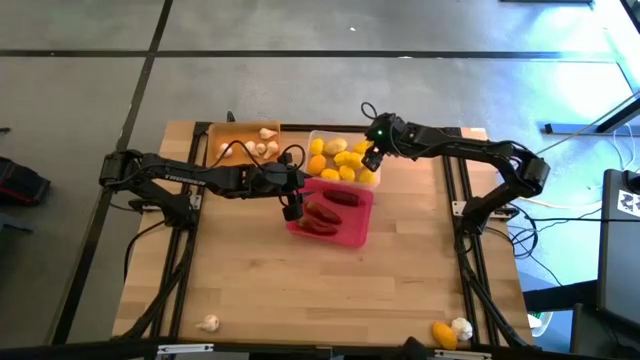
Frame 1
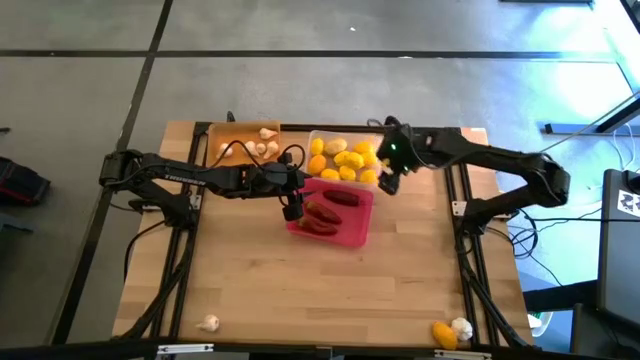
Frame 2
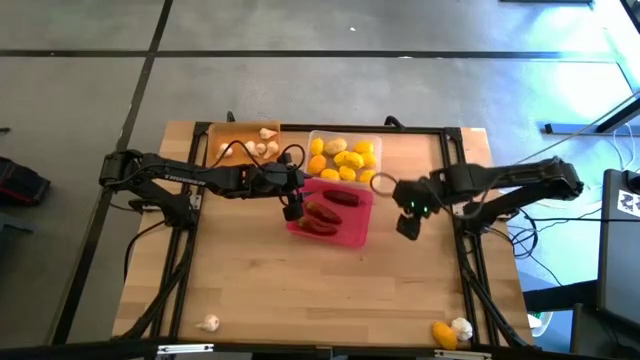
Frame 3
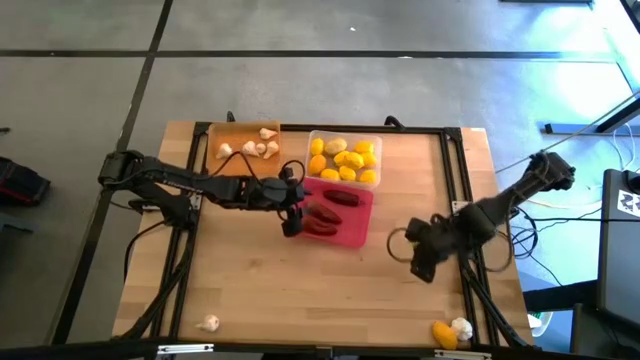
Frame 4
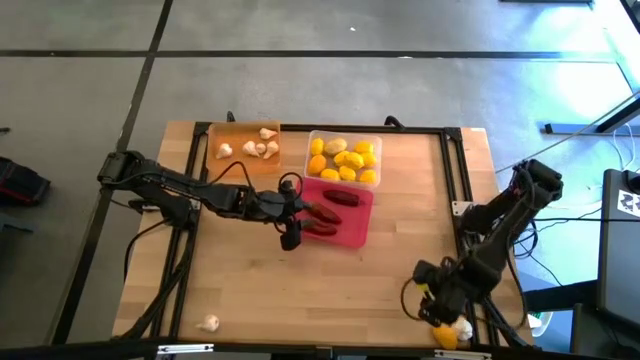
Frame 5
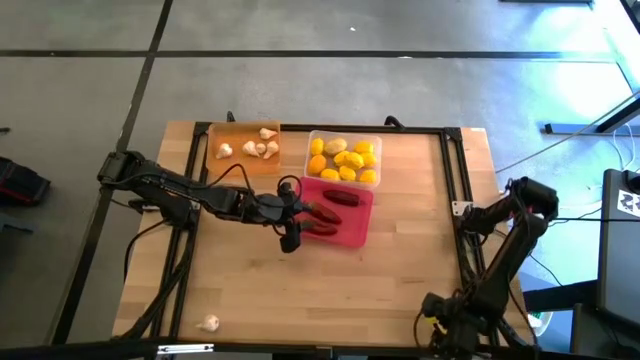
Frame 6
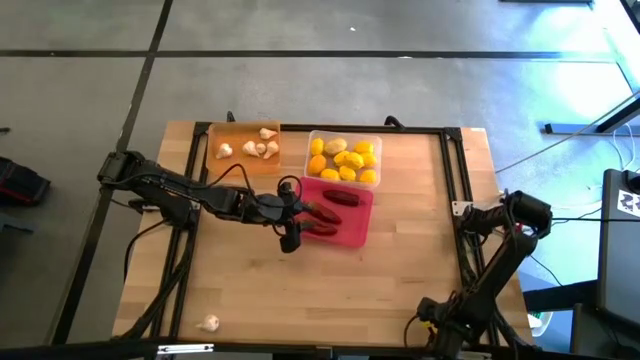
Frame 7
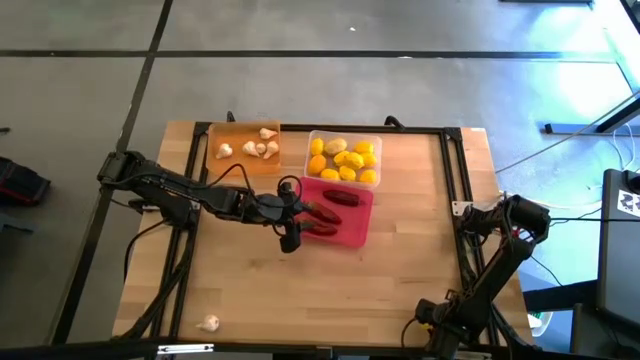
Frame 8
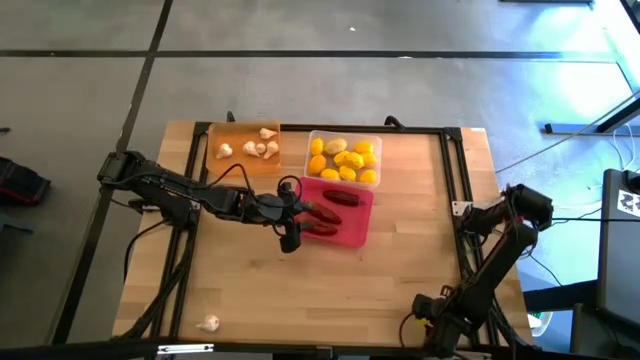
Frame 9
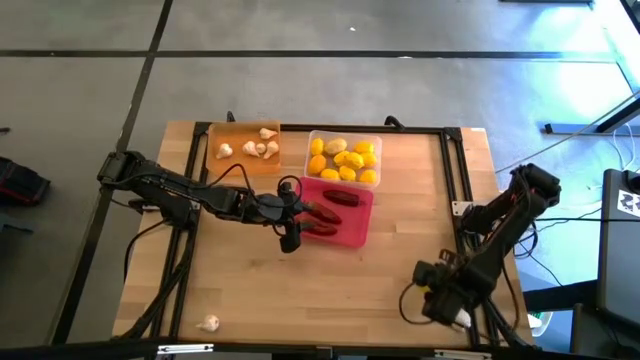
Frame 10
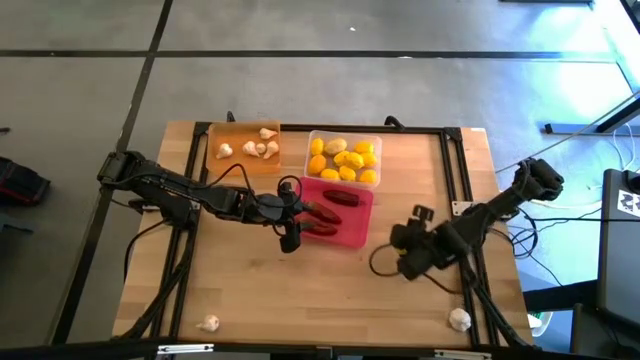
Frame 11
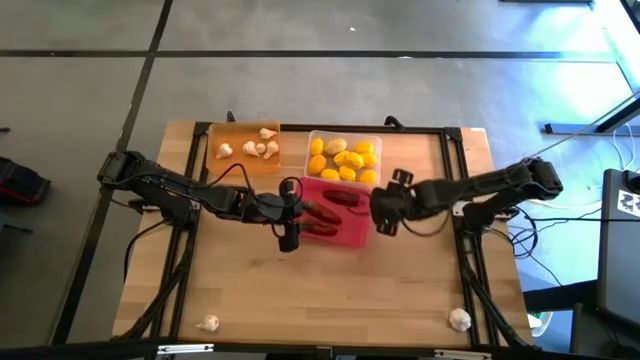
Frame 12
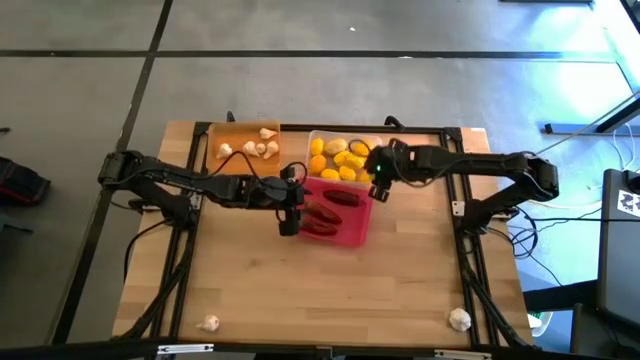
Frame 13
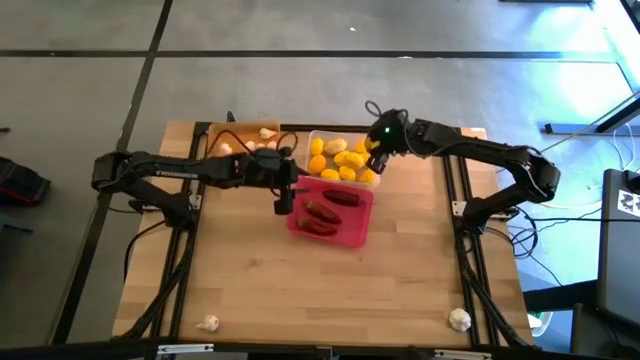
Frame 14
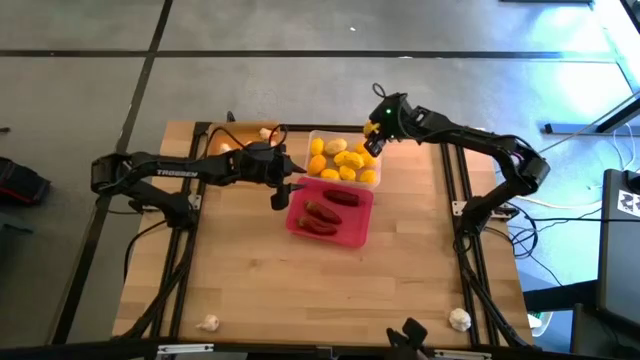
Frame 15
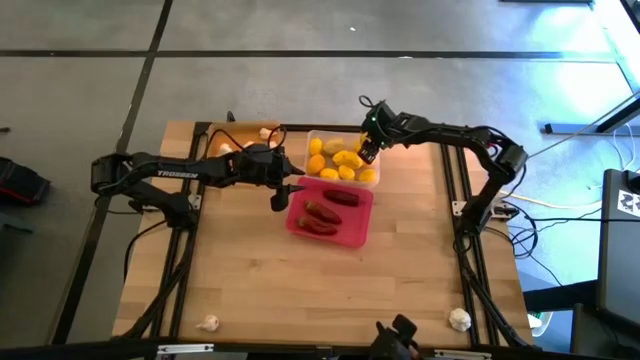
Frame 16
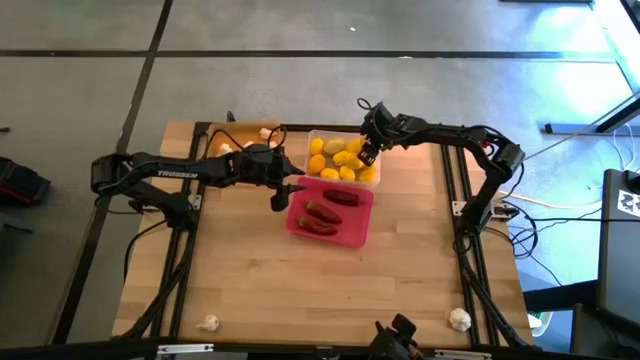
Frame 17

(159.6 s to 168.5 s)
Task: Sort produce into baskets
Put the yellow lemon in the transparent bin

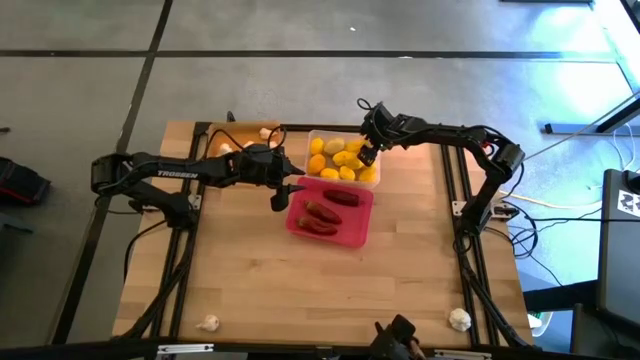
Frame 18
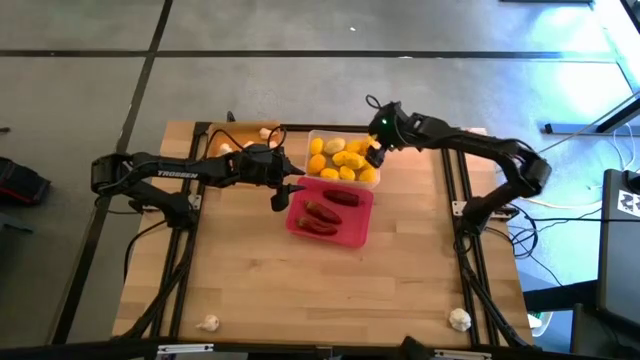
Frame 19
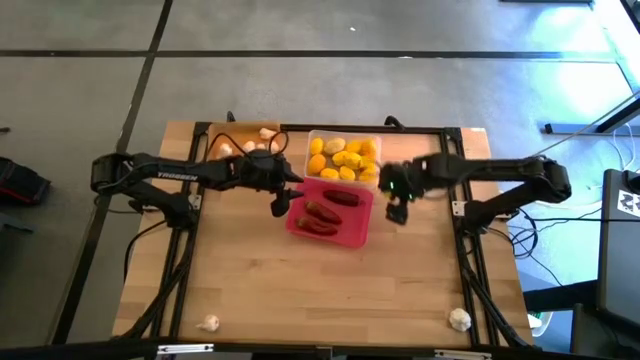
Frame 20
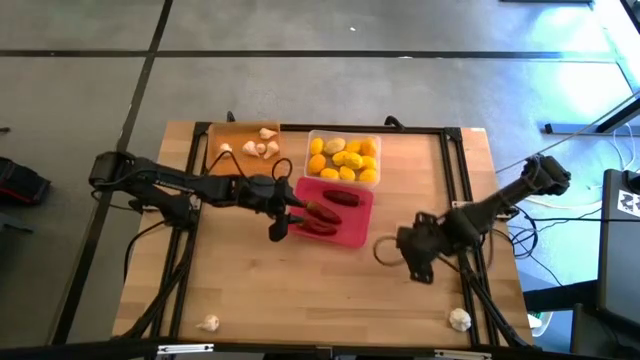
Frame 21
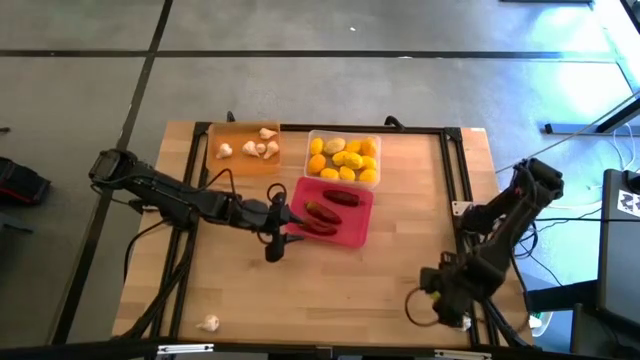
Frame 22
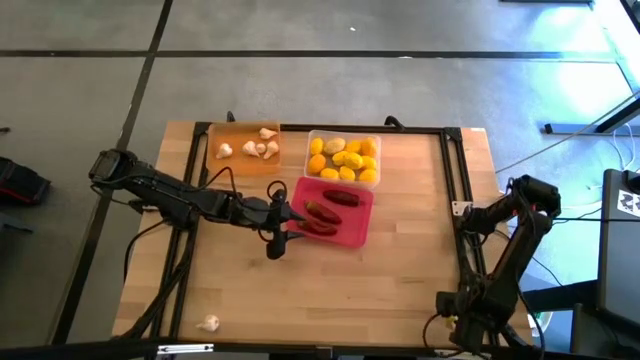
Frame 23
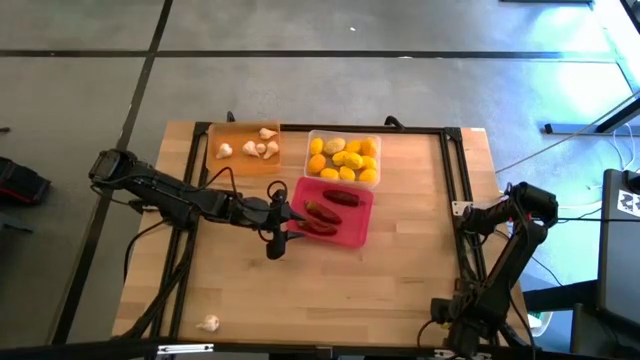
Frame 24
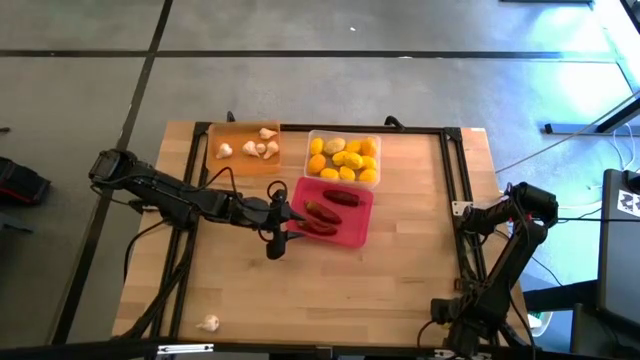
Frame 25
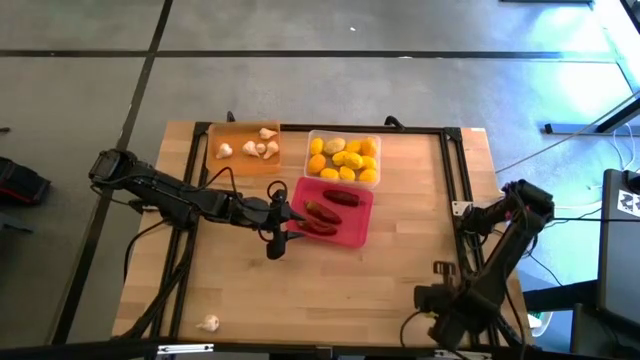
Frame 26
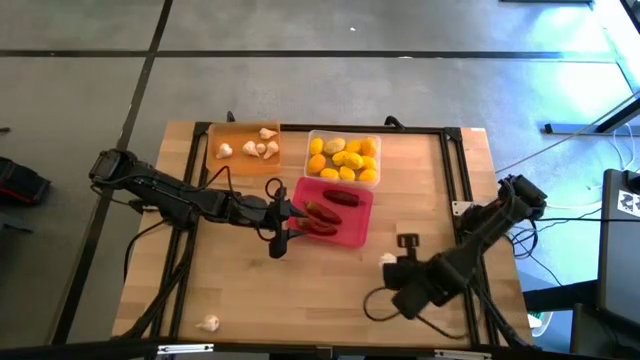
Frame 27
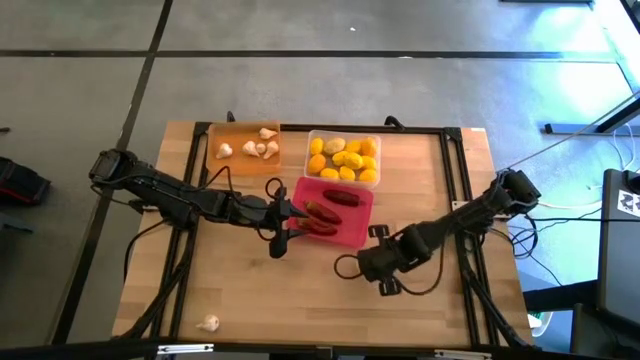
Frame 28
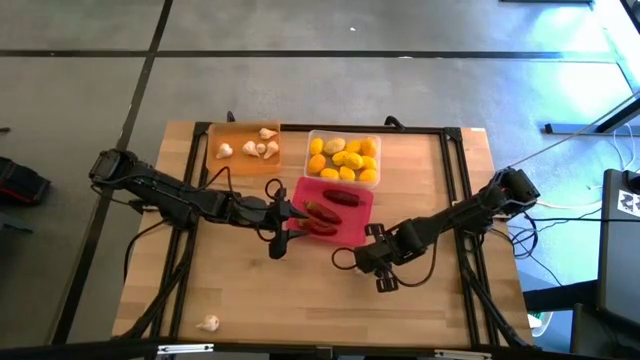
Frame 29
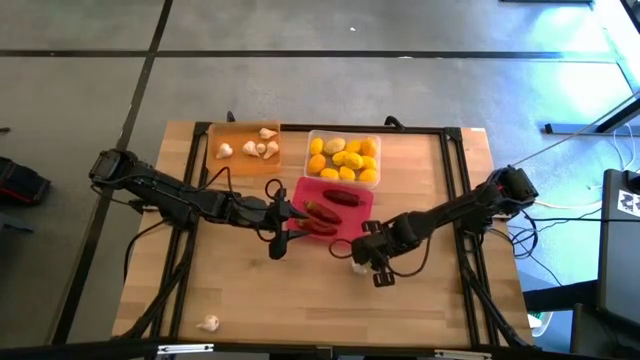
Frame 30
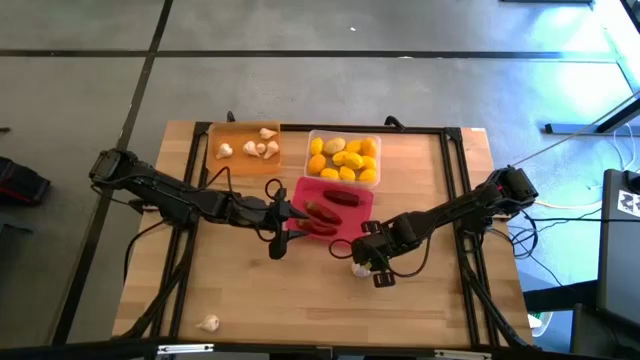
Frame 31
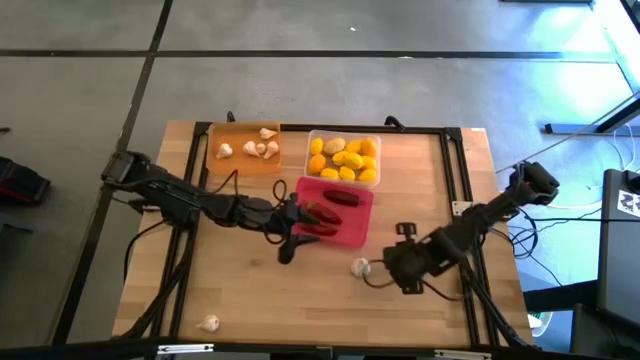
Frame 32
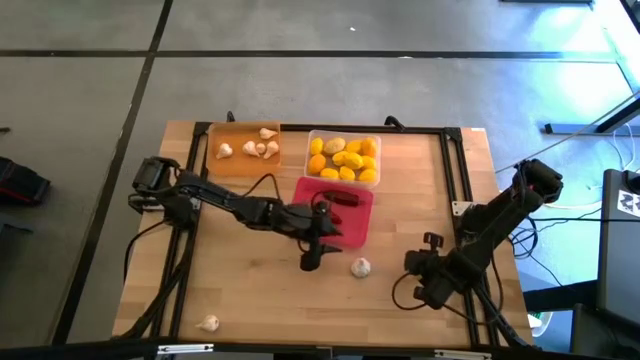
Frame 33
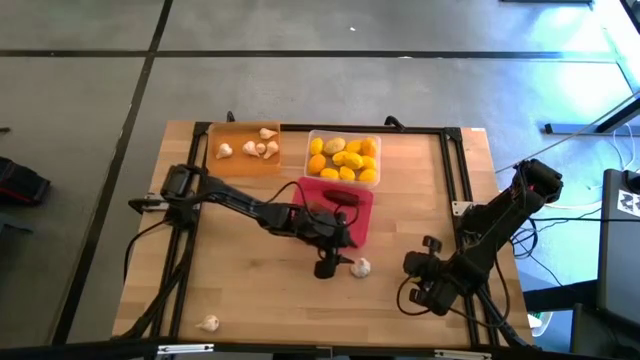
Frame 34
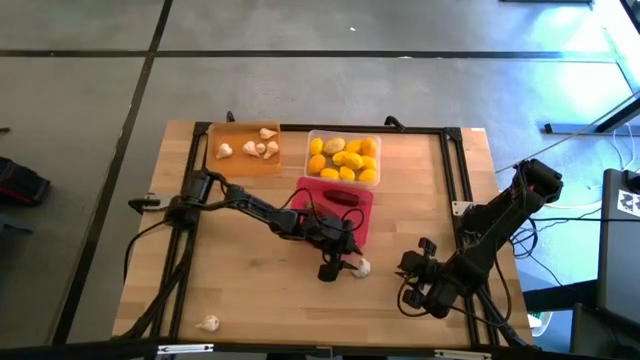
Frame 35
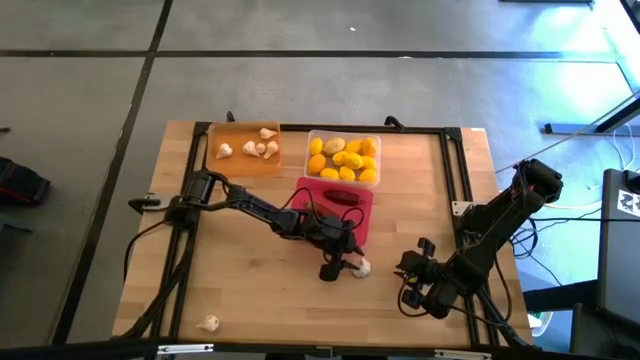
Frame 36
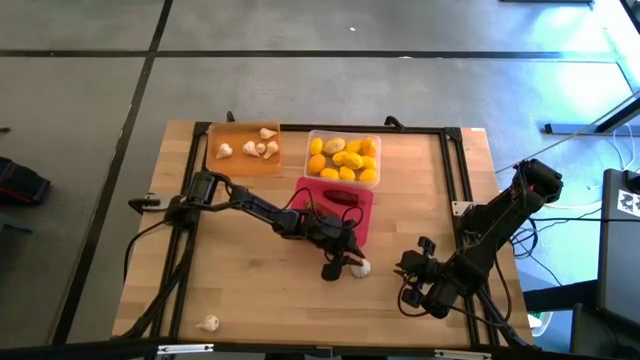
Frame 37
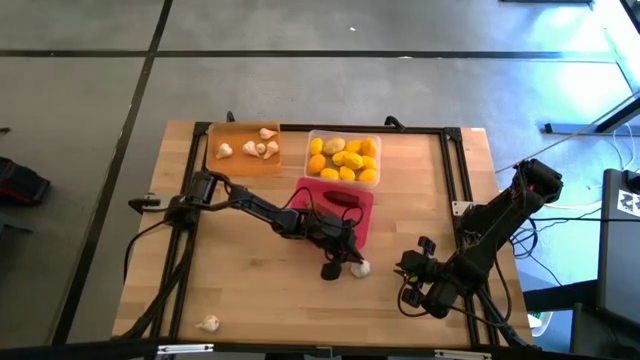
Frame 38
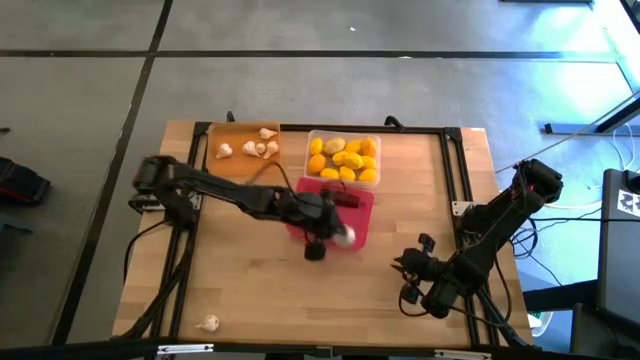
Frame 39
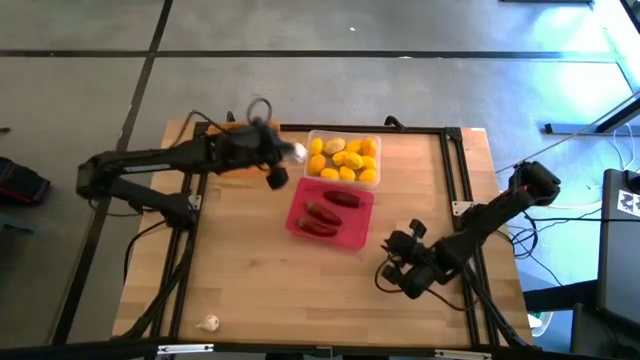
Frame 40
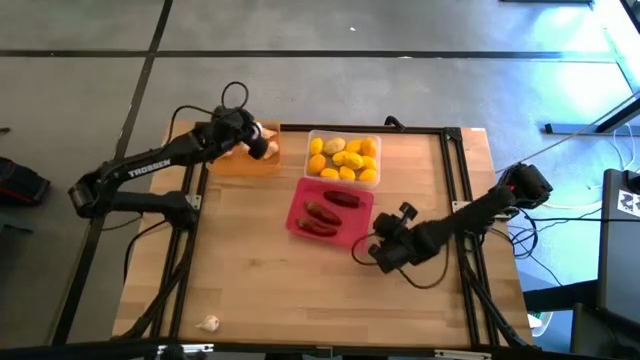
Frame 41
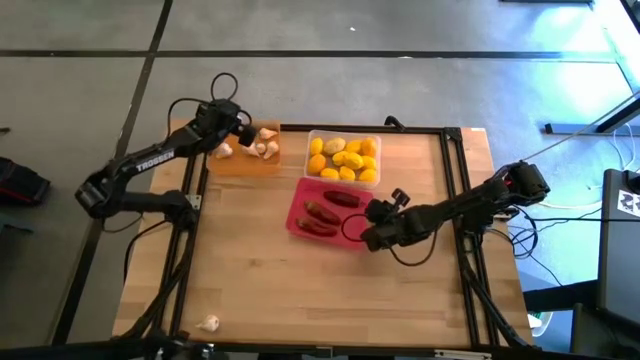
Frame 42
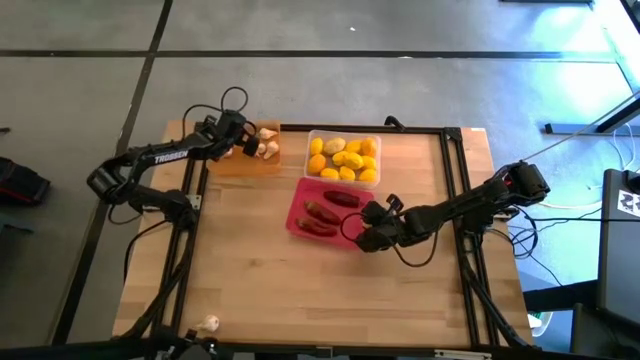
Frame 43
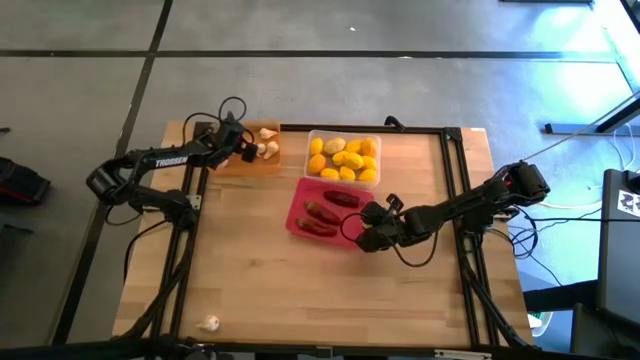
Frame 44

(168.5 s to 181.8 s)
Put the white garlic in the orange bin
